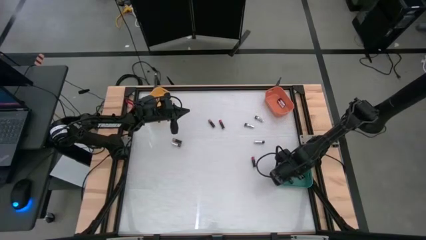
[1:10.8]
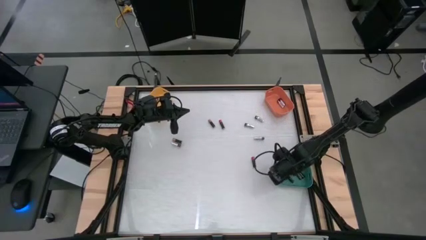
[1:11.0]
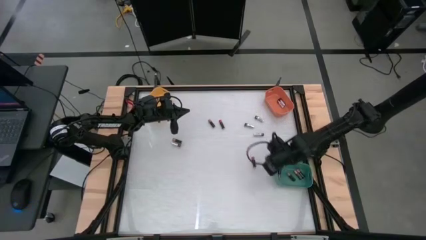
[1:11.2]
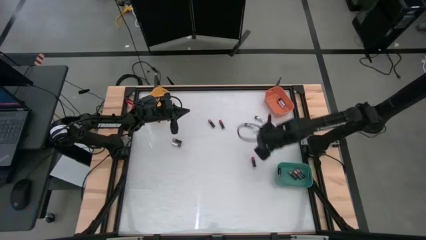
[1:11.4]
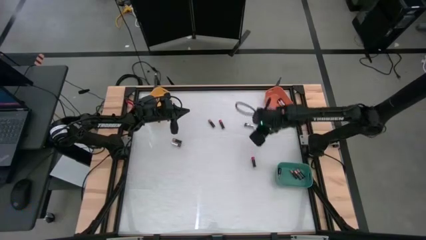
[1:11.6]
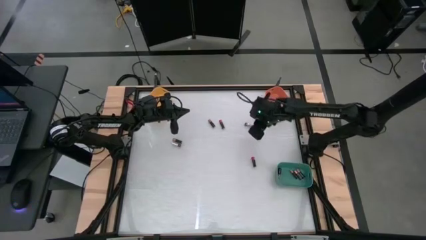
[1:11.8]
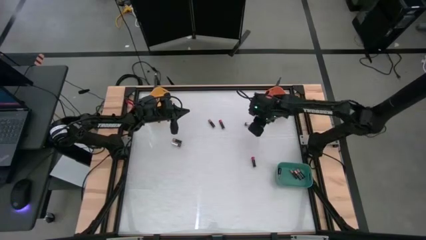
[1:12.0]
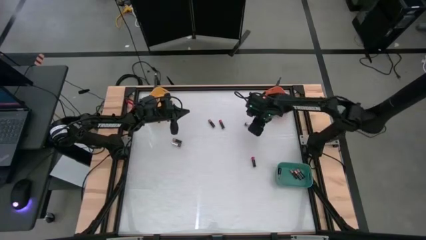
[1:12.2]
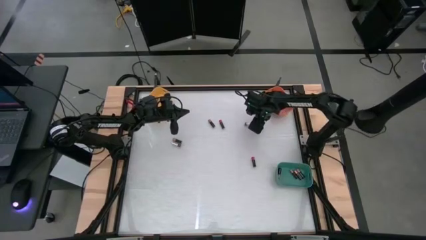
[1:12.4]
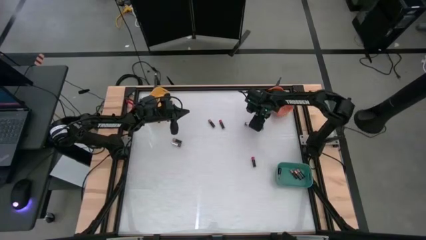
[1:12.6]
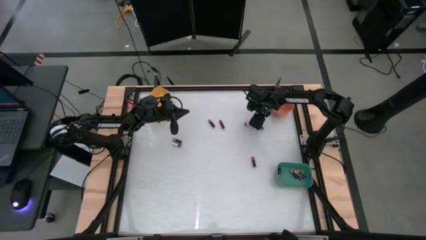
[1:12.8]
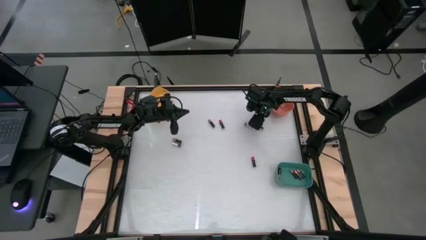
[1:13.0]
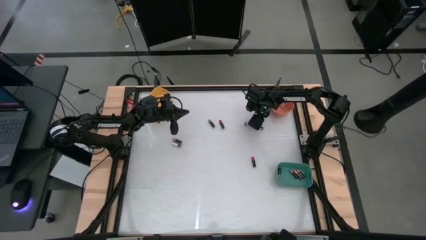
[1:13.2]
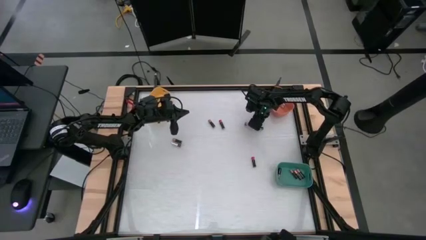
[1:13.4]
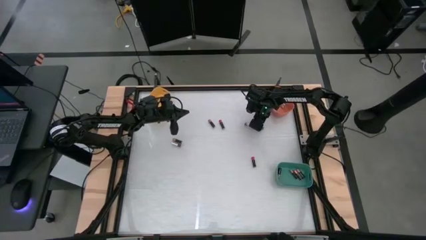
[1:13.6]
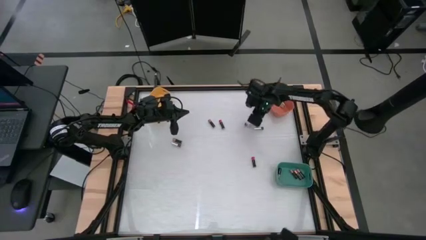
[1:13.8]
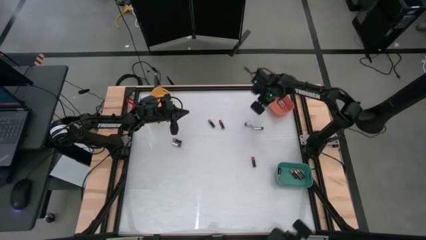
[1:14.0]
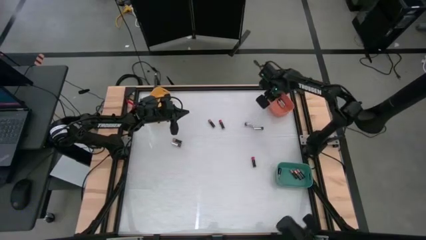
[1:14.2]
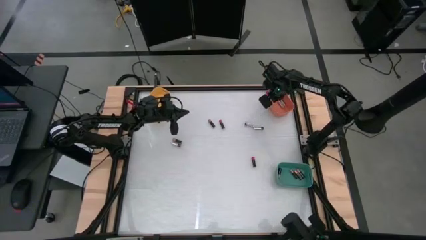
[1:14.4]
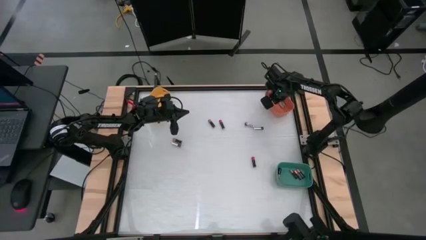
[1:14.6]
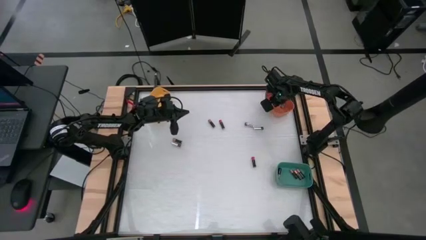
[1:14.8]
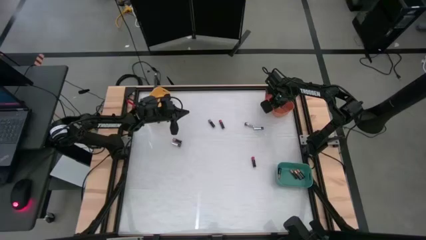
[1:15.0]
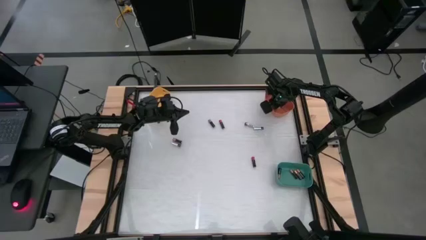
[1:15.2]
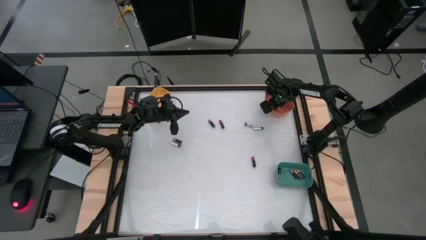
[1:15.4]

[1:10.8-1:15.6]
Task: Sort batteries
Put the silver battery into the orange bin

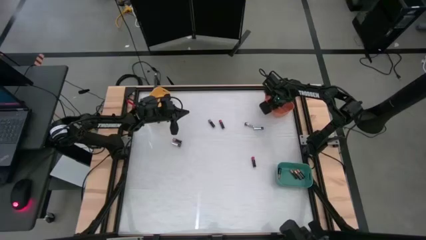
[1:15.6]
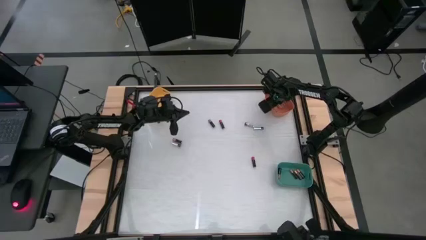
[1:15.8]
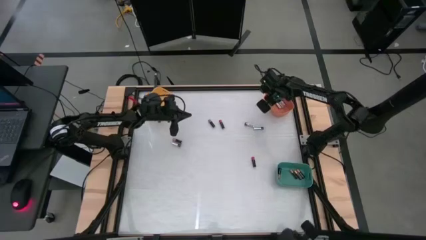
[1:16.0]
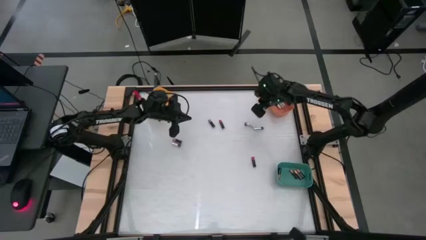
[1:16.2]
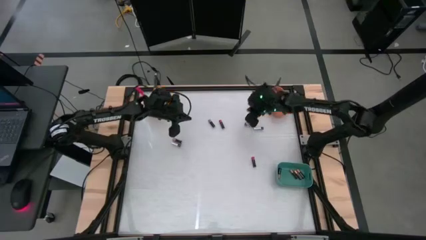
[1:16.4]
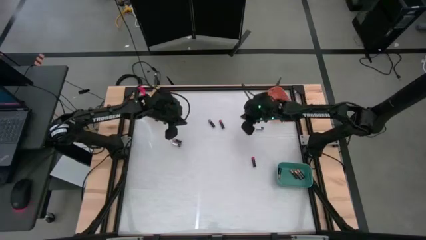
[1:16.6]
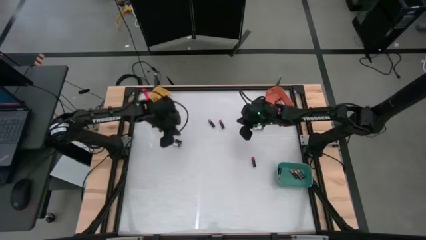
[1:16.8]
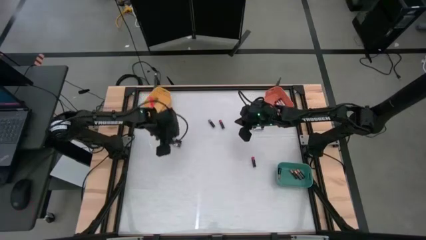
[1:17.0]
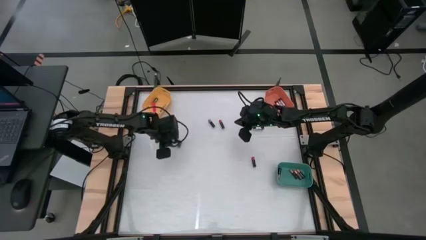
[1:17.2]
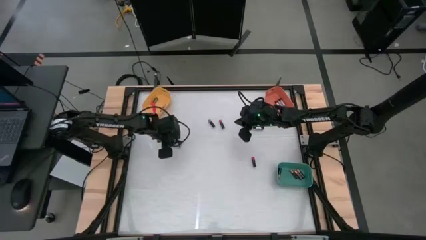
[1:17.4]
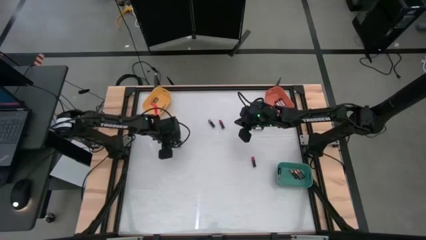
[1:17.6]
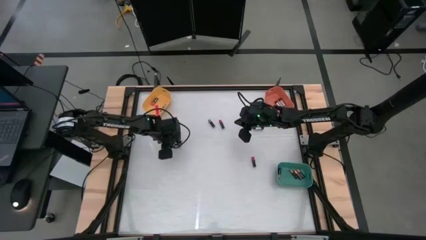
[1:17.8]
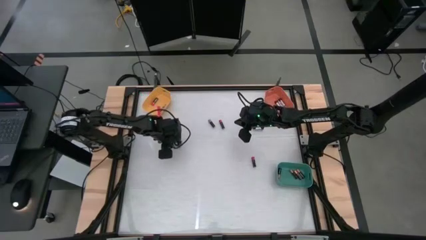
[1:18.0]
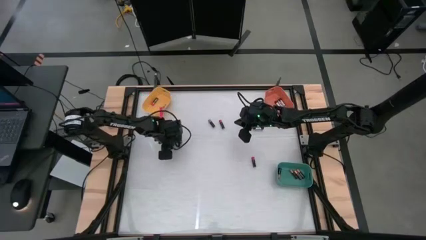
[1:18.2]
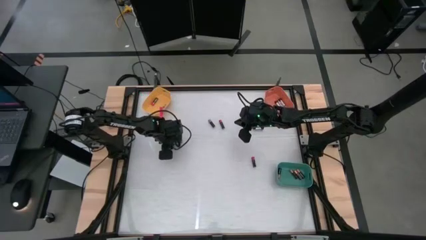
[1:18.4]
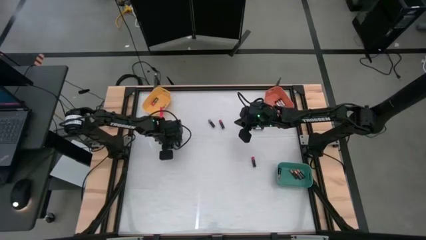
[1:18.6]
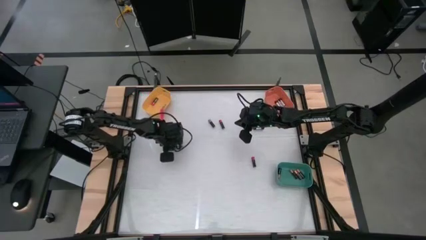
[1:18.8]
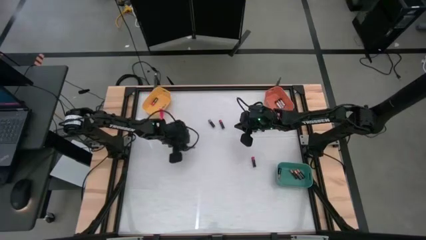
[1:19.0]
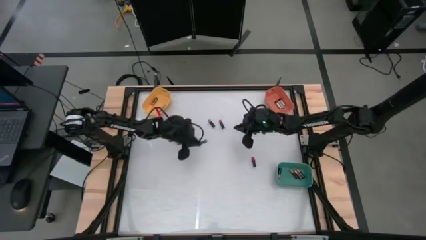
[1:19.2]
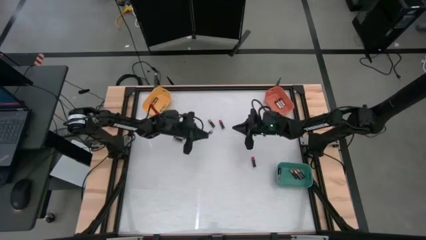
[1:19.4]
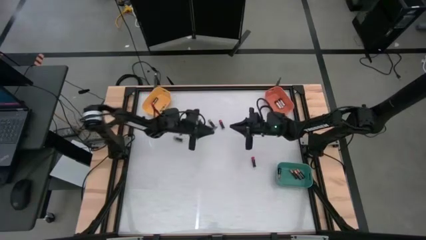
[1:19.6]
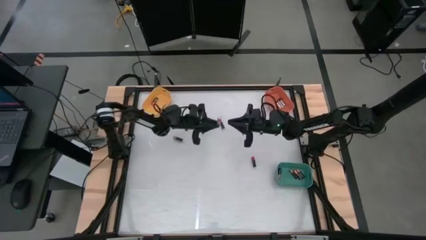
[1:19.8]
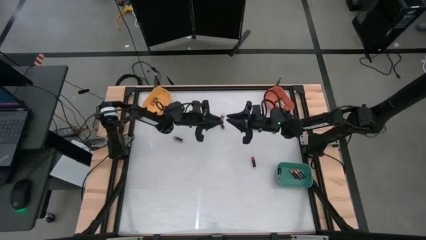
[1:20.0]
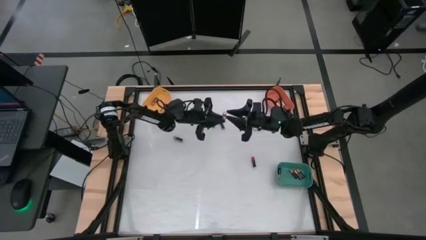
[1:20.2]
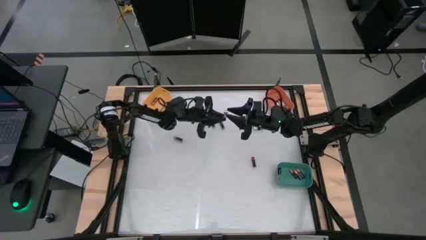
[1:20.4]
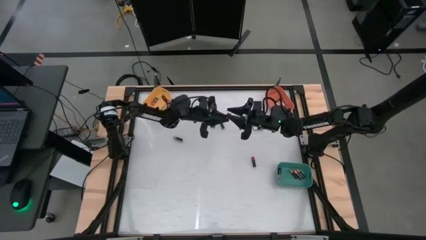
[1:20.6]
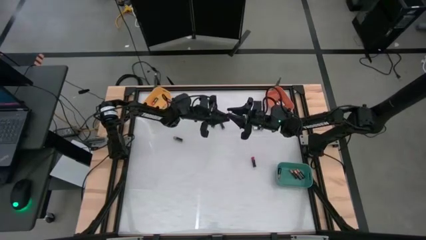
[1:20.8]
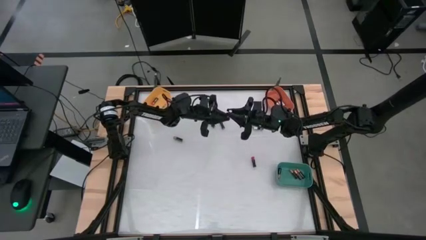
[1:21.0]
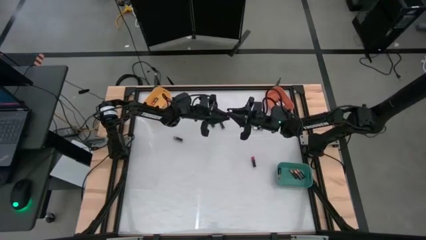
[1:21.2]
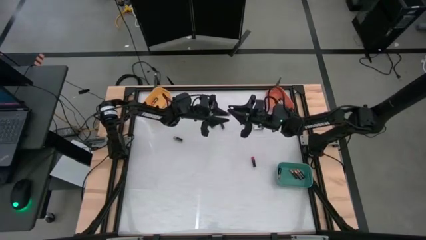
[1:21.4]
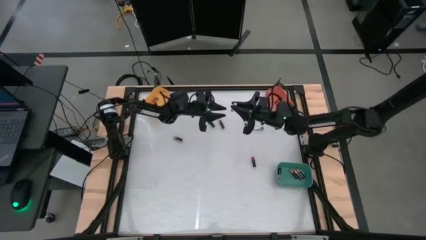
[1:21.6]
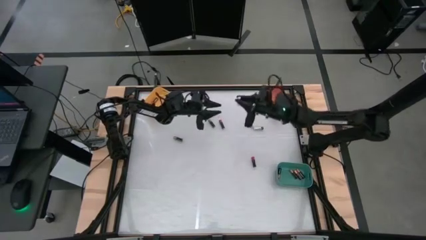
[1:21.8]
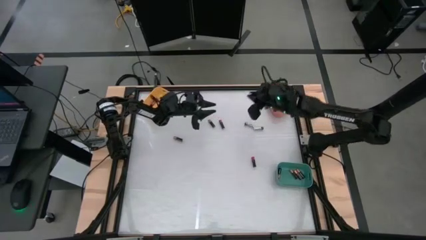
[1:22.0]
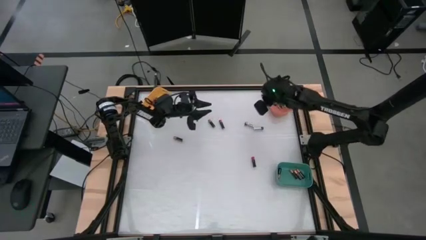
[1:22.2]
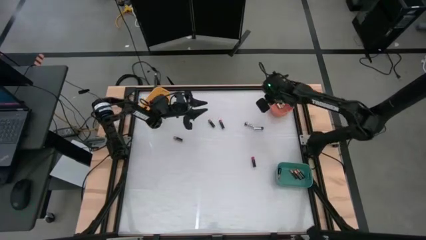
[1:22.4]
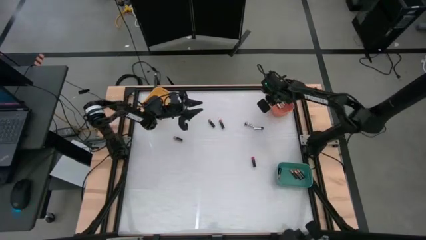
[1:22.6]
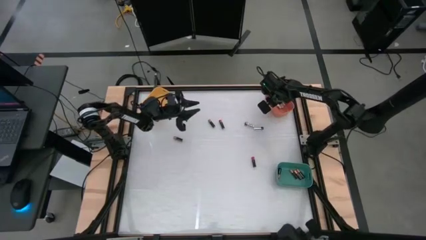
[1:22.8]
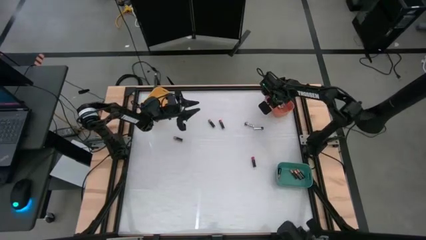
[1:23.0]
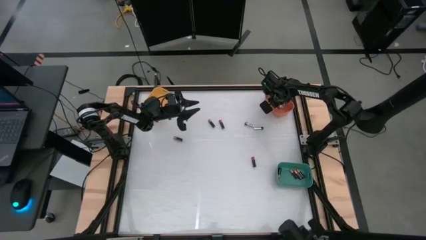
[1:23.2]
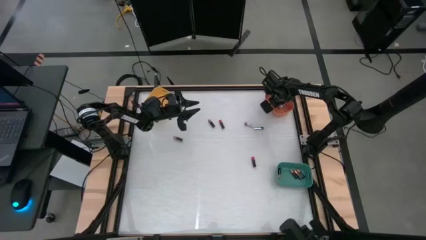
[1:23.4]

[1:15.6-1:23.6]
Put the silver battery into the orange bin

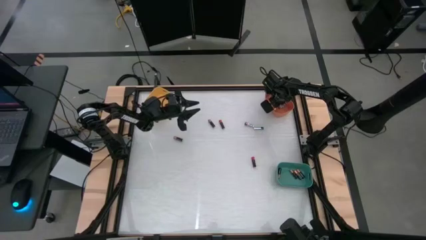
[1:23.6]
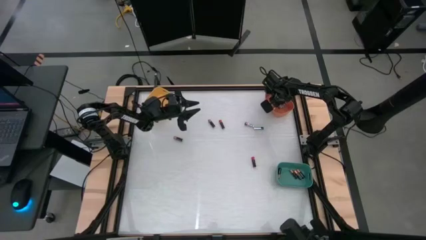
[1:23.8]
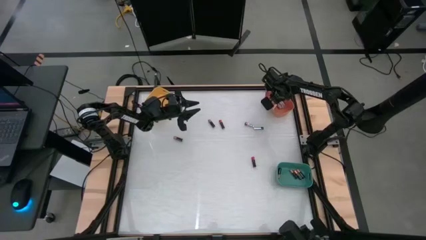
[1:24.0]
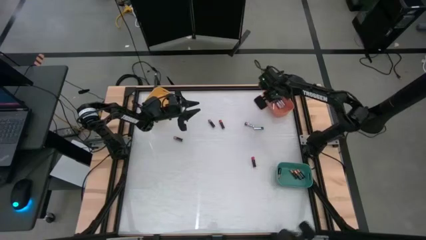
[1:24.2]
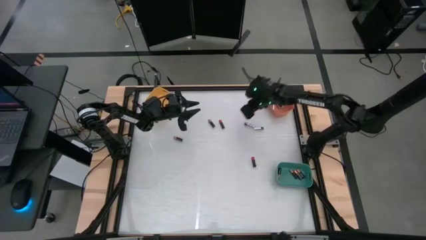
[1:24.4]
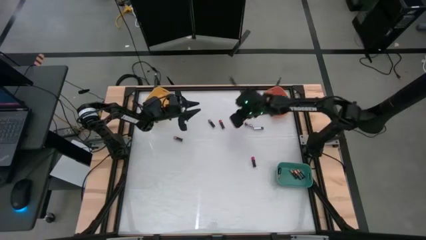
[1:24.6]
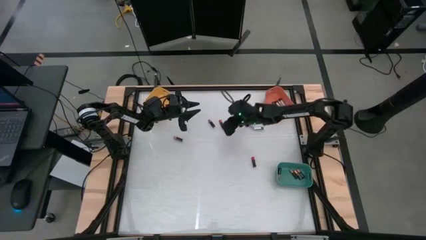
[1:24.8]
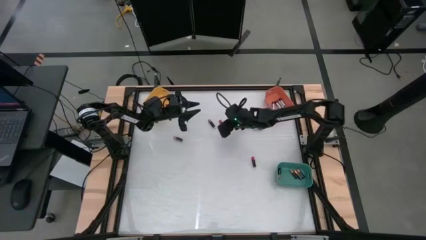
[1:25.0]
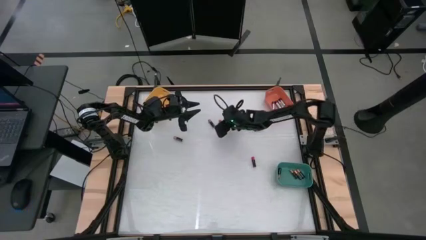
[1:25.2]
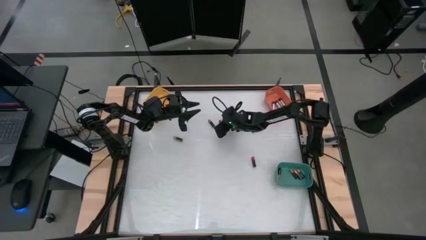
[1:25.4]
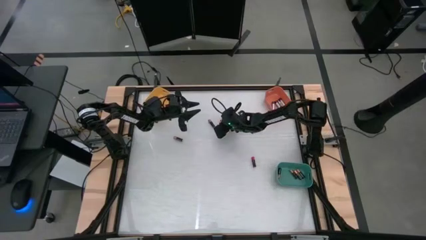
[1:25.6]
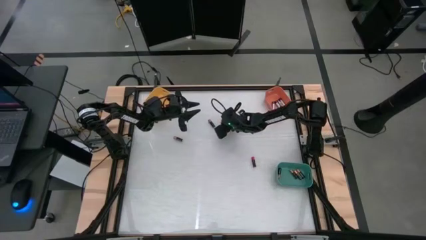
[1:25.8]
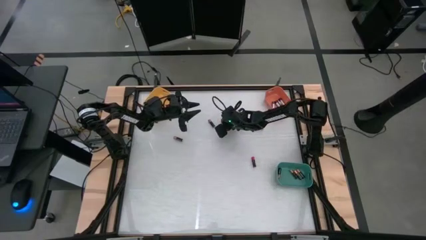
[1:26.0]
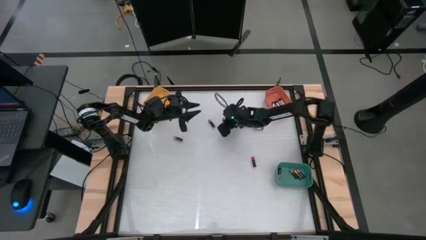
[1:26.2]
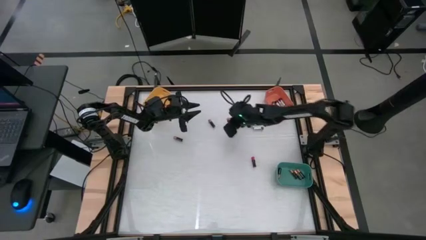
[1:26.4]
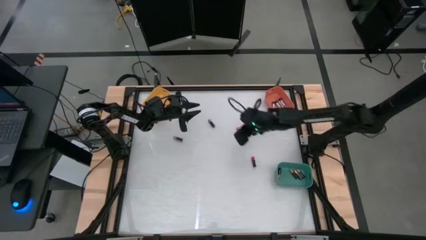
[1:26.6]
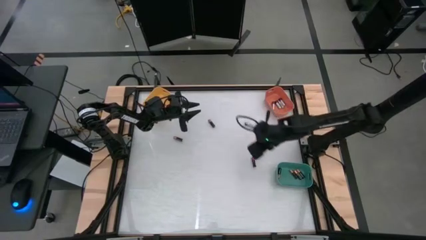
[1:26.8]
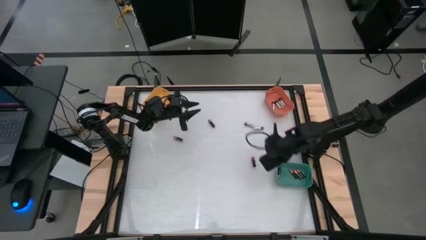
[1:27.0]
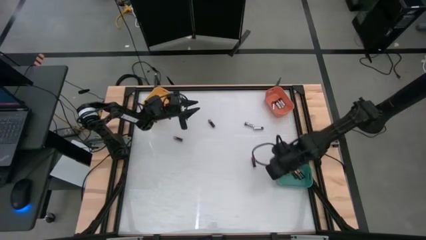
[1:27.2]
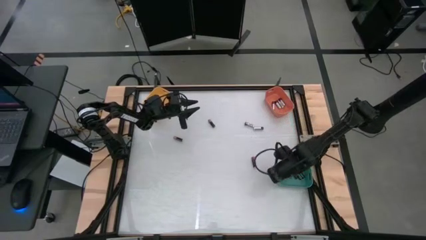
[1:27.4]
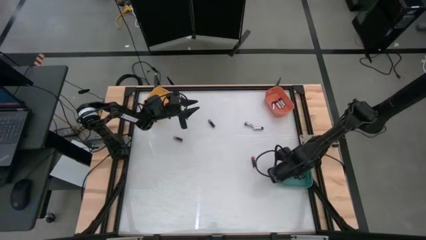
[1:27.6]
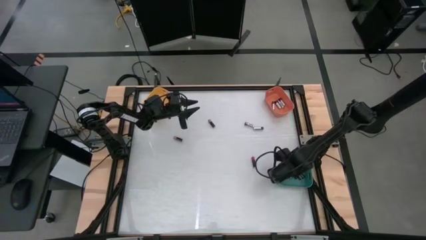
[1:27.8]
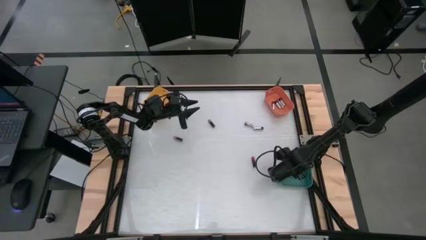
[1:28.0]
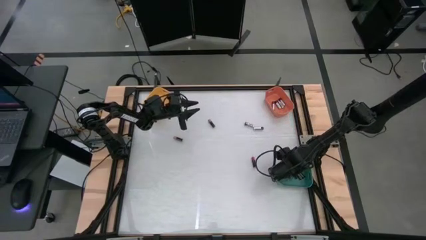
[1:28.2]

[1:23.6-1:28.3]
Put the red battery into the green bin
